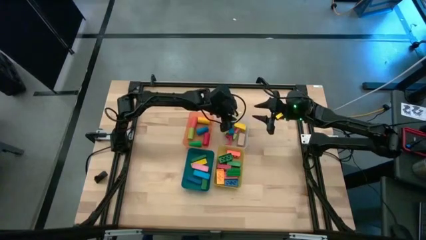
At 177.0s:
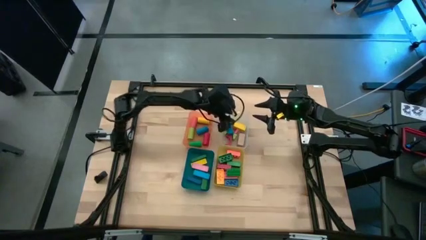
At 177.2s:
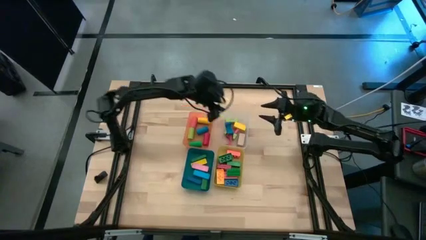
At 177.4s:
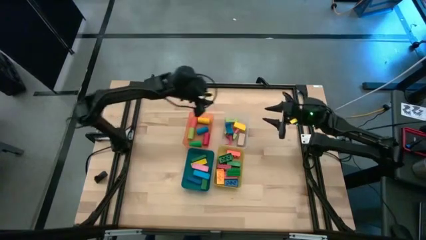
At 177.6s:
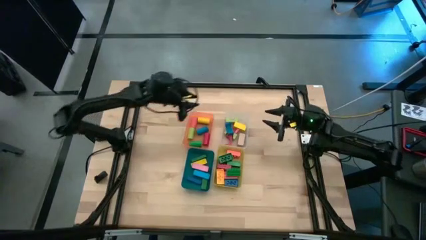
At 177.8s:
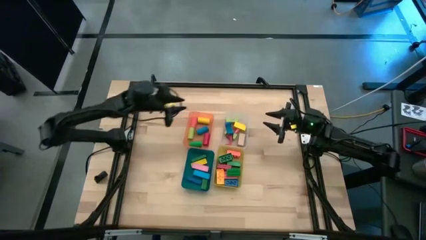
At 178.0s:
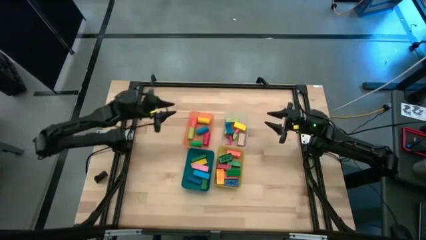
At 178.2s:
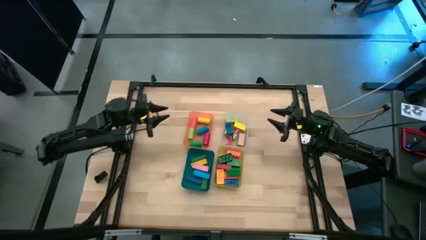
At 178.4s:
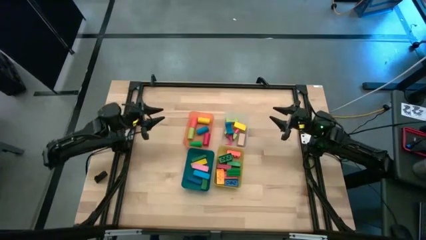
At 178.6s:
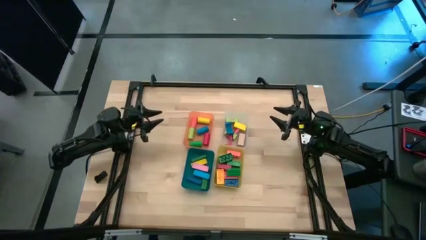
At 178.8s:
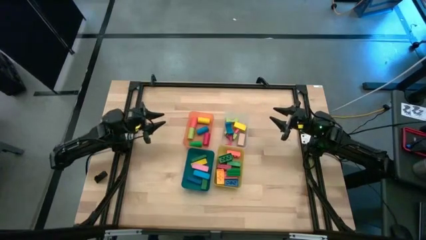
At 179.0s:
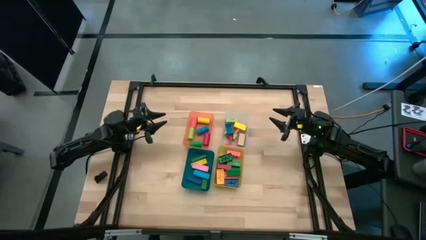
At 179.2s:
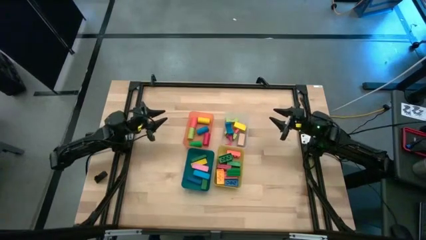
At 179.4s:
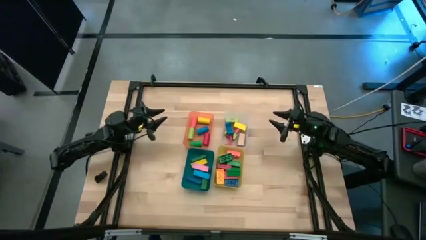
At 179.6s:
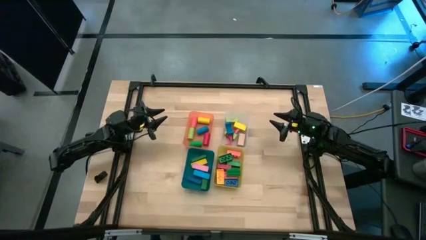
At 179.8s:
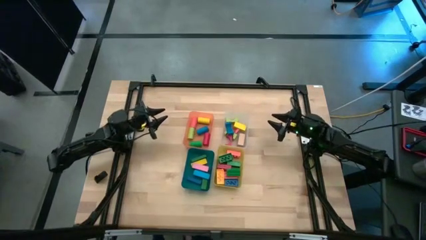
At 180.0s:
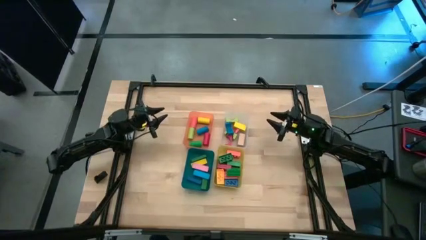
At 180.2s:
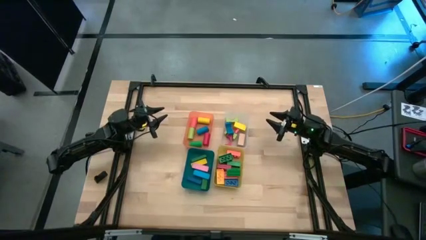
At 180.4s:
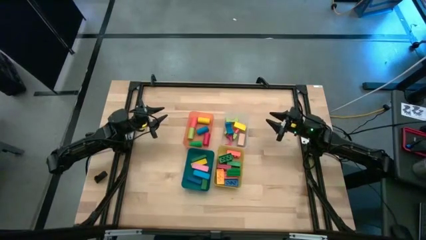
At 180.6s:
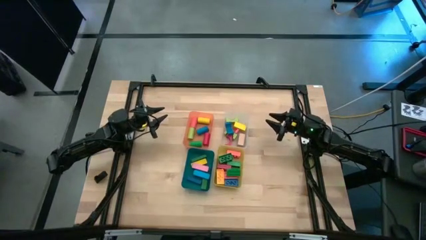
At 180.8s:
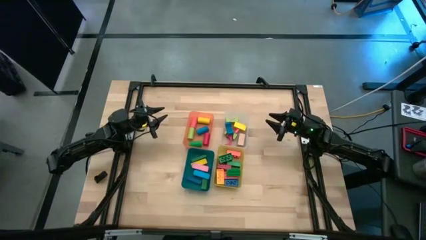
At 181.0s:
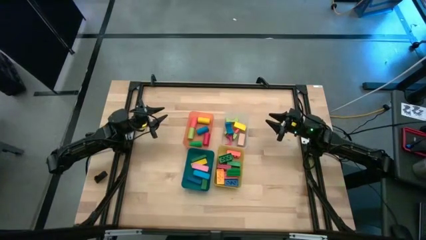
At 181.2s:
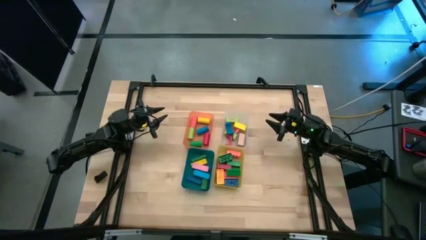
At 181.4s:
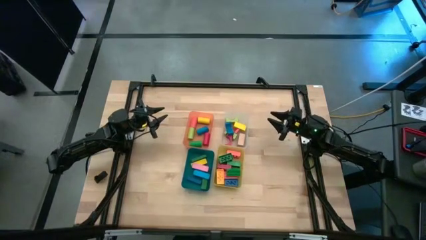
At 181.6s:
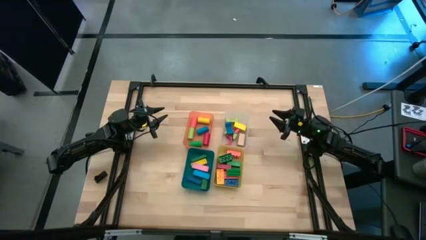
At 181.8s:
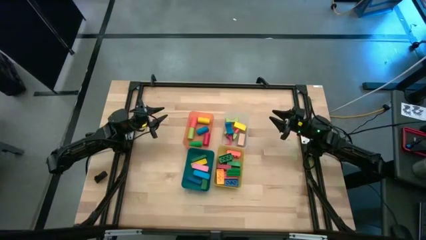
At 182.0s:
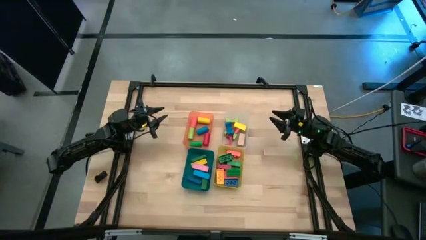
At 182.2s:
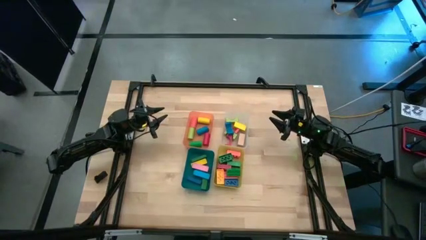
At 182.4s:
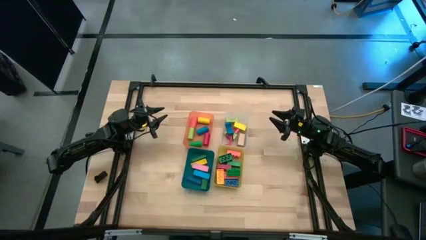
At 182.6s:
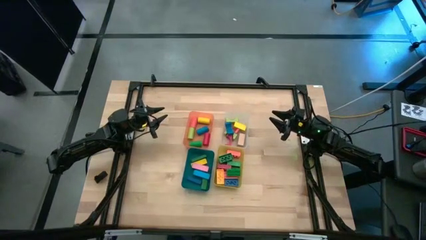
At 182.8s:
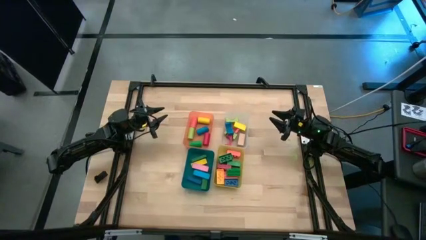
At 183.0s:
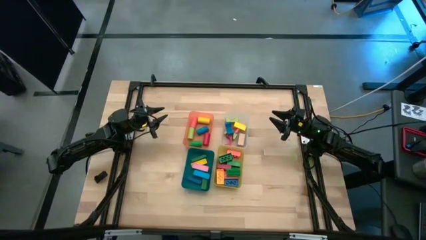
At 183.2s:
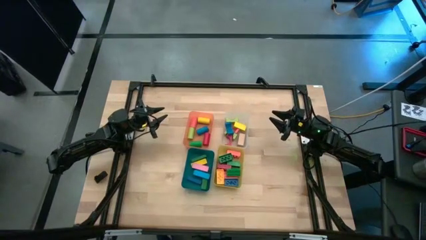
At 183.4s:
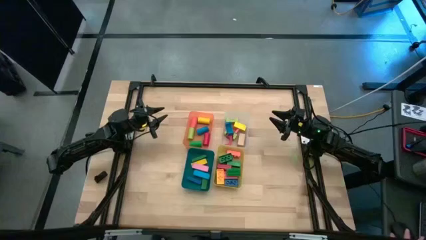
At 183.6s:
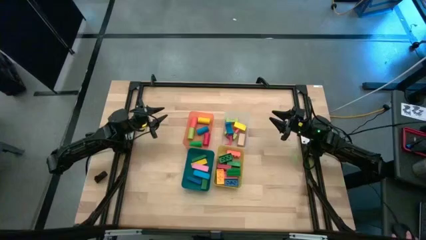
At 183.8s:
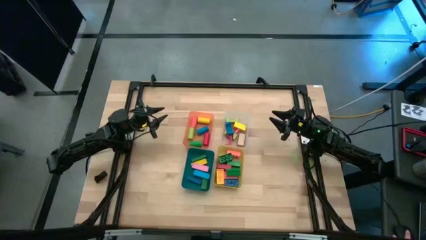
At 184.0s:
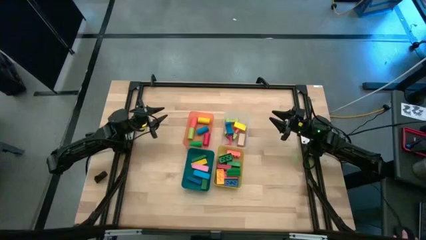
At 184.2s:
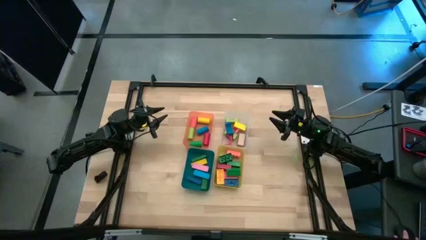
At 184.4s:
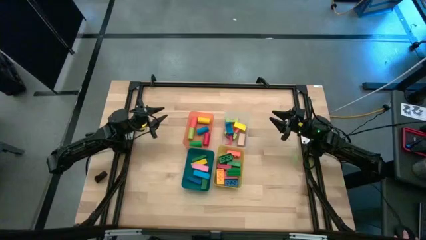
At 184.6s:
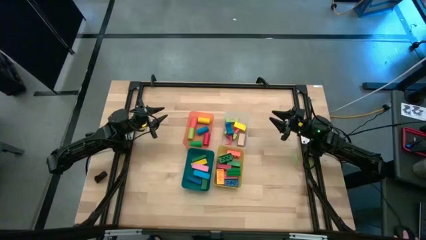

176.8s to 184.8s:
Task: Sort blocks by size
Return to home position

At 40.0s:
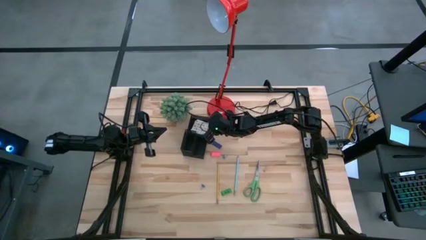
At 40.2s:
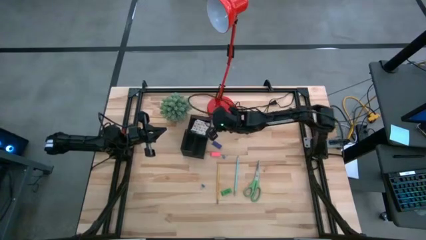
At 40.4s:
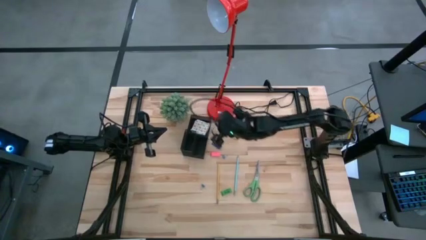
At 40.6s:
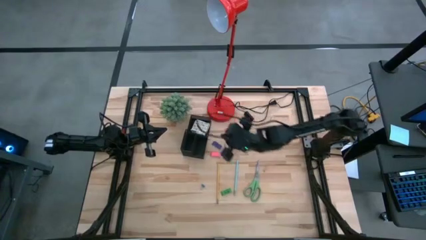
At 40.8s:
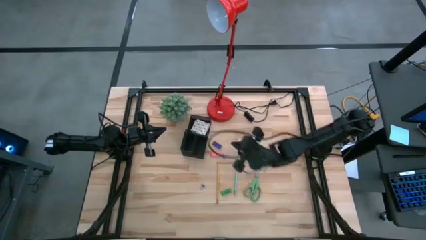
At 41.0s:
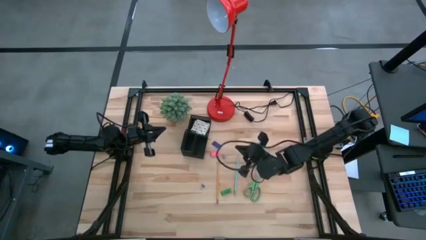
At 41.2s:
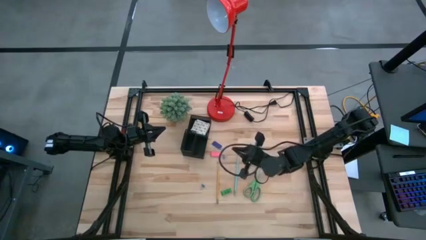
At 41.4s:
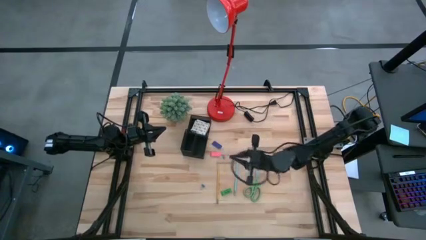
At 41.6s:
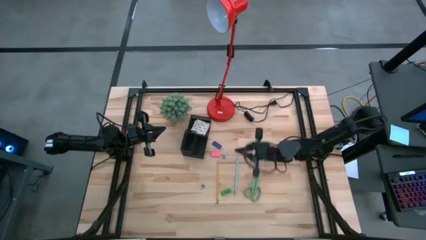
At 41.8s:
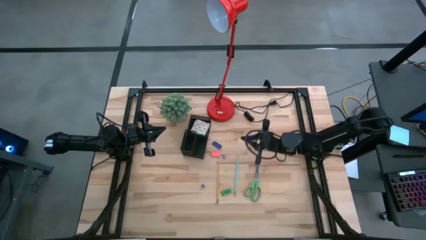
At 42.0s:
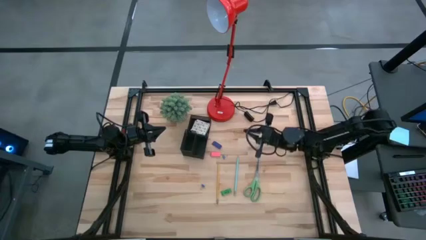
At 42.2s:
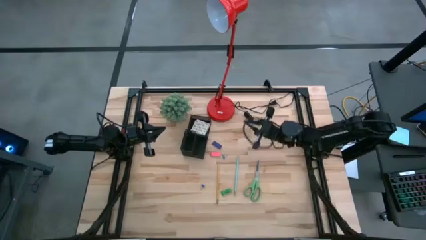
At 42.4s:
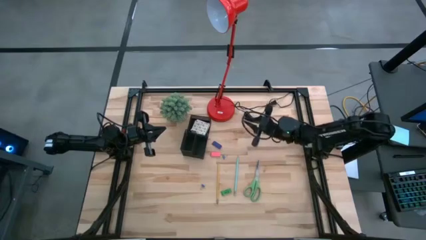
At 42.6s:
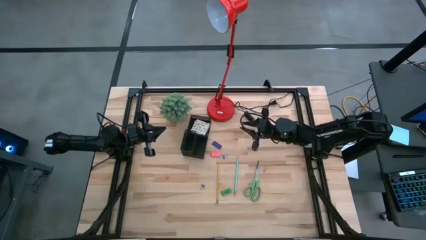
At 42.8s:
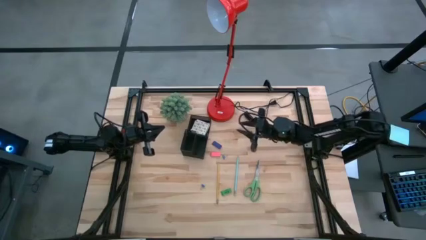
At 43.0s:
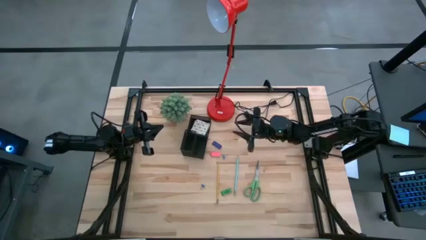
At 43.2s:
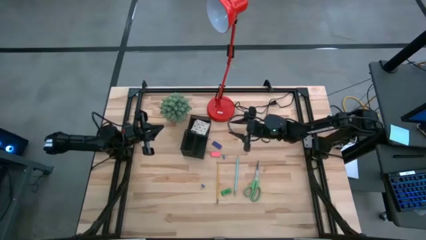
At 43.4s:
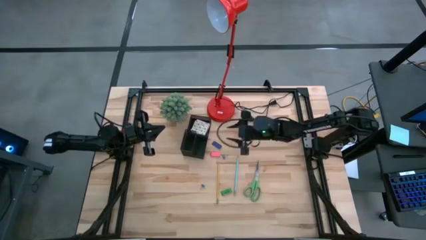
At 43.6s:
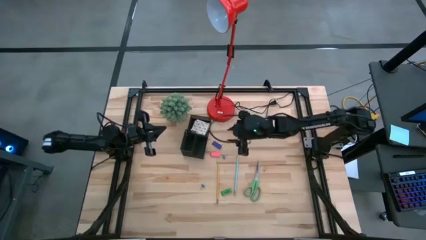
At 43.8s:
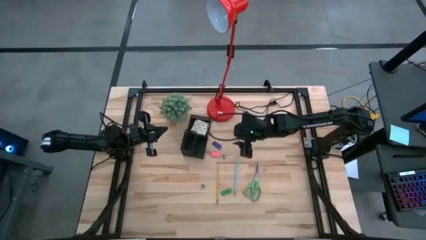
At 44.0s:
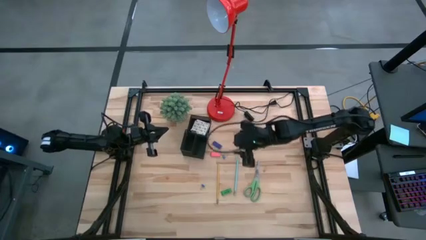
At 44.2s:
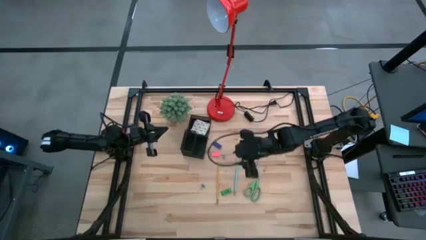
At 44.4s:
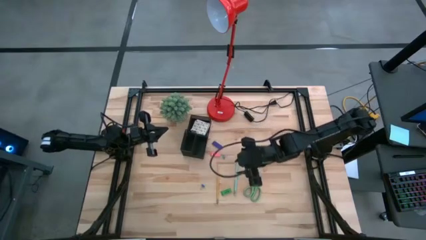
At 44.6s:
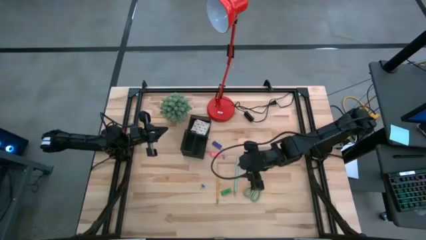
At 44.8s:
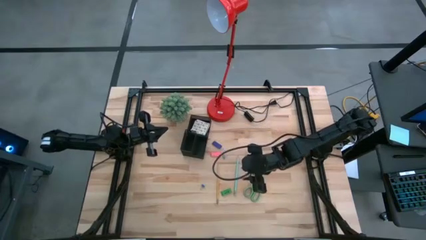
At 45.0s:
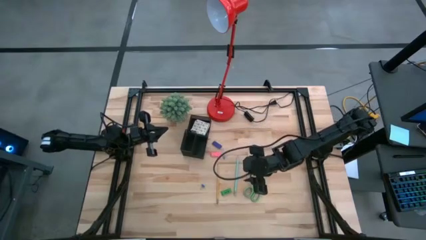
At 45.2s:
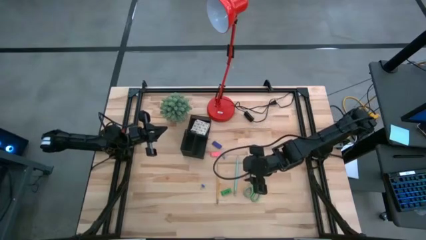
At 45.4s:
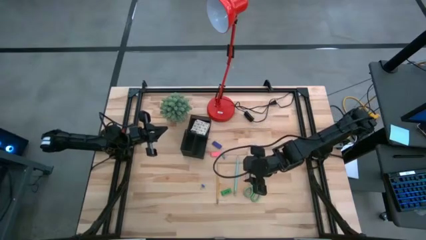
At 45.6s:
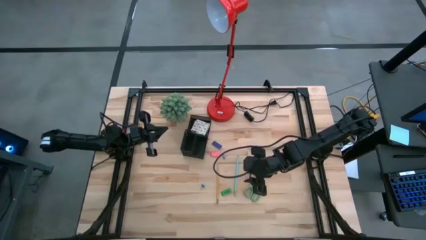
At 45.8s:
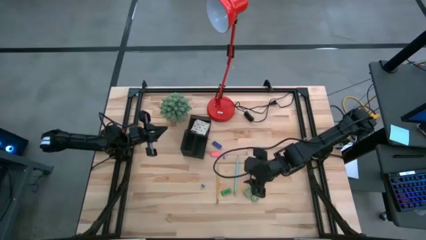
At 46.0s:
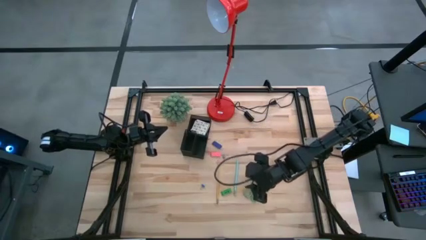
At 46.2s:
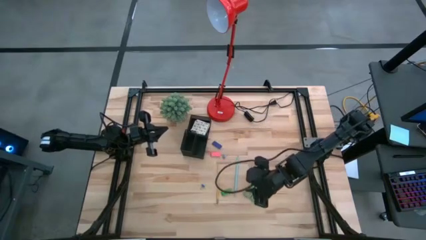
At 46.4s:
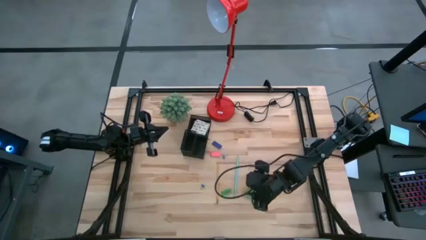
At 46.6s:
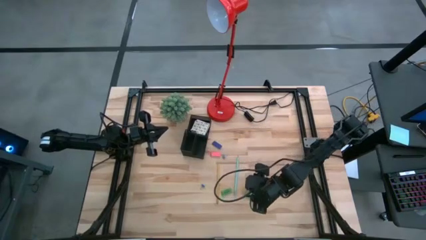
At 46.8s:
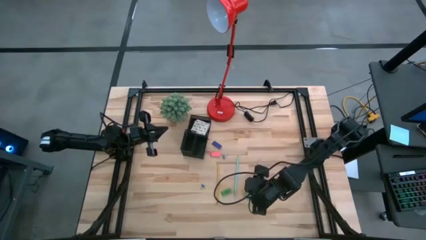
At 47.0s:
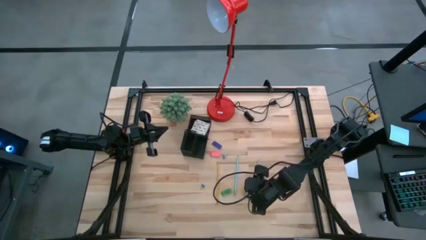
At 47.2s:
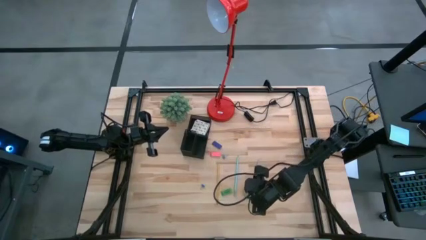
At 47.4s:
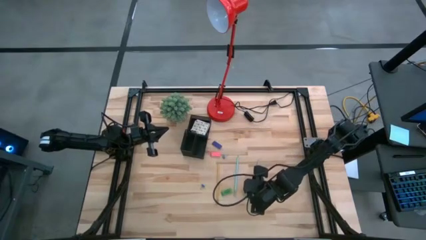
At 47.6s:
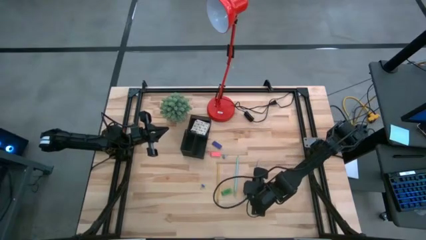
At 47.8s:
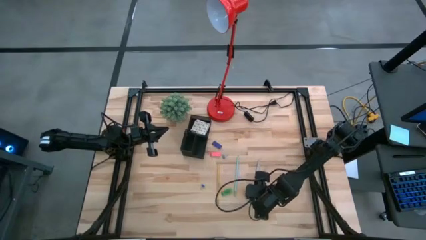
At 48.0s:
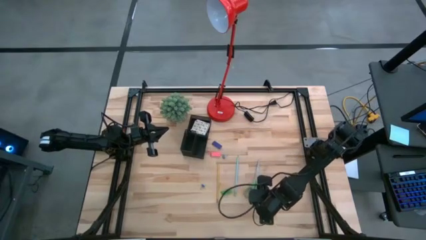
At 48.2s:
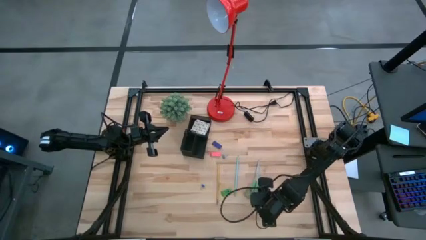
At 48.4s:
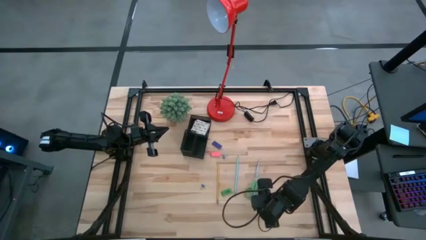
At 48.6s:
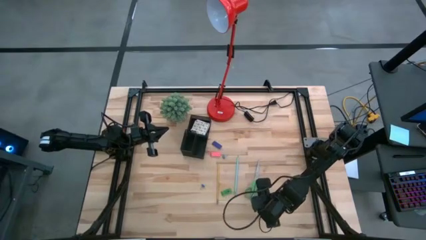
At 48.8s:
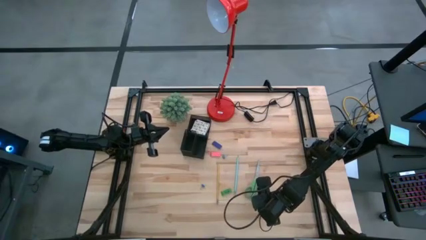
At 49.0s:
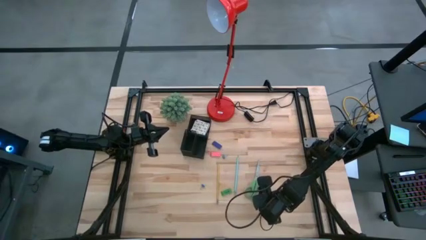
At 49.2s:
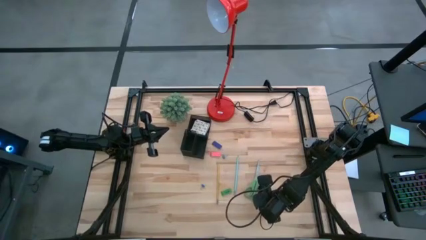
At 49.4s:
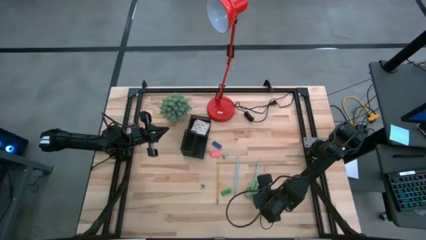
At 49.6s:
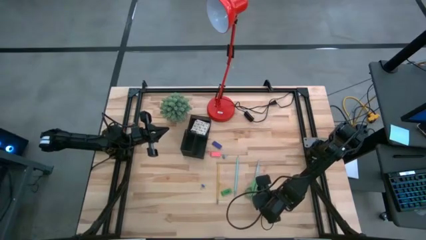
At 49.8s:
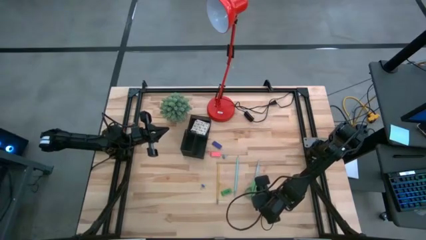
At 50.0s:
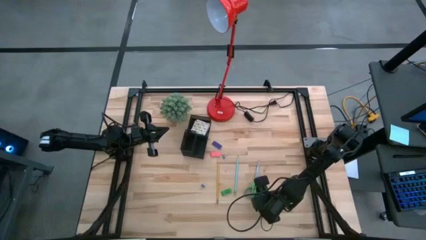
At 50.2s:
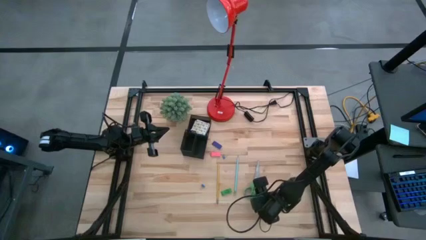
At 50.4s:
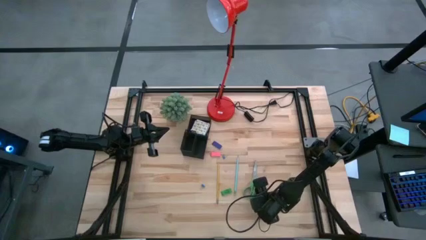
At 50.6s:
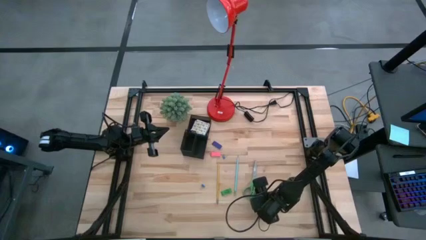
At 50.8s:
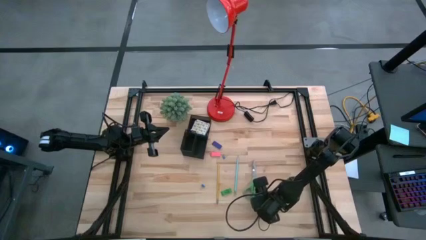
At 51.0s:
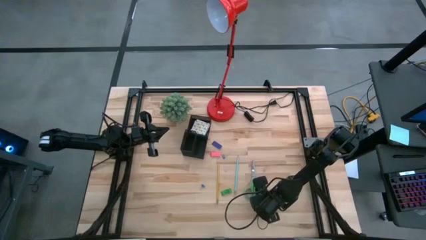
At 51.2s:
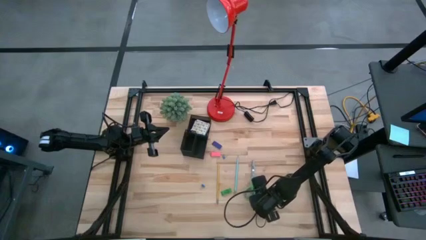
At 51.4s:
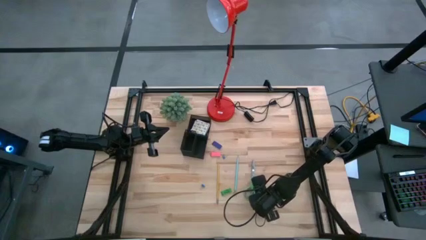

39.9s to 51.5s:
Task: Pick and place office supplies into organizer
Put the green scissors in the black desk organizer
